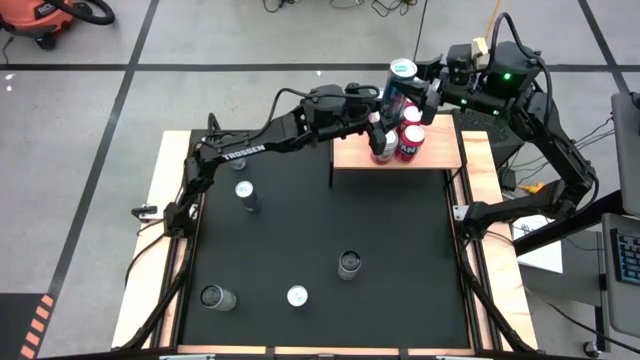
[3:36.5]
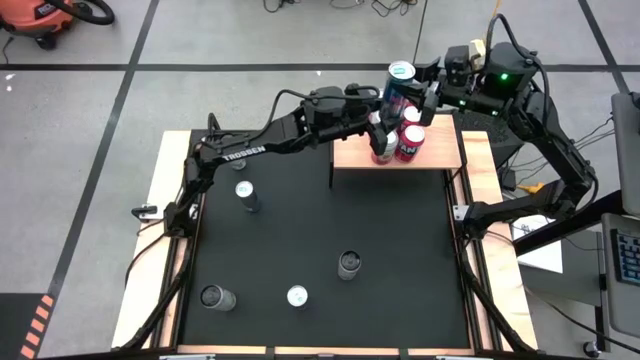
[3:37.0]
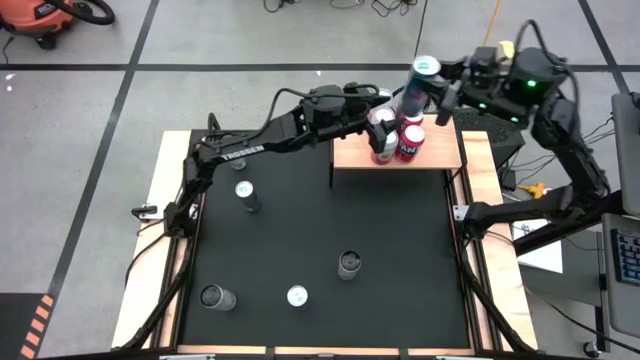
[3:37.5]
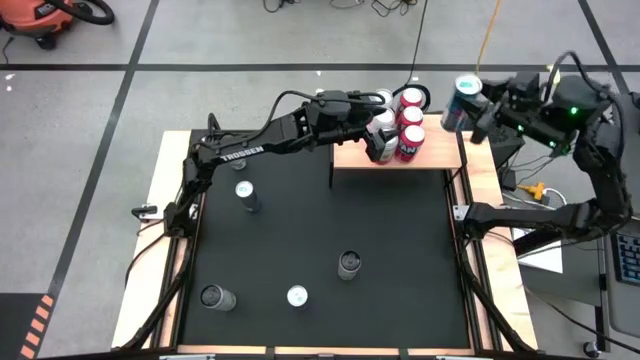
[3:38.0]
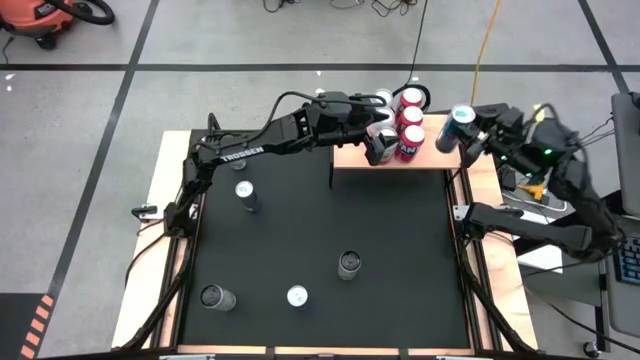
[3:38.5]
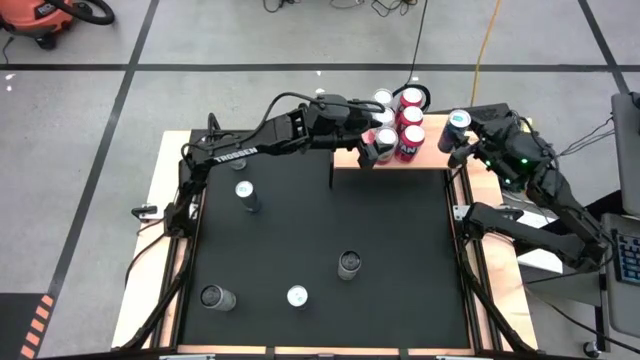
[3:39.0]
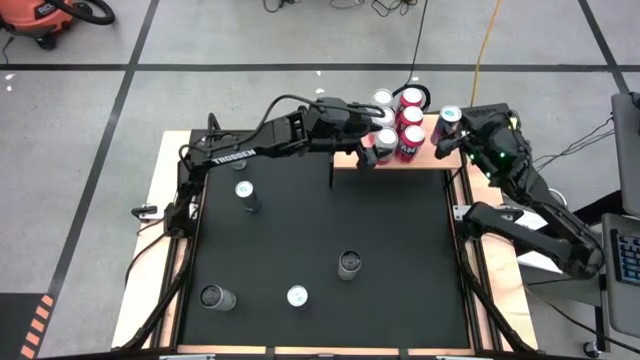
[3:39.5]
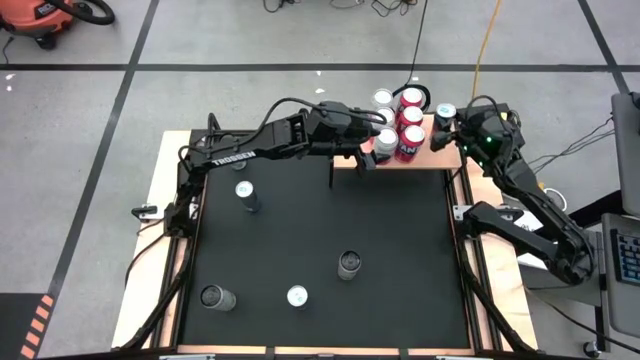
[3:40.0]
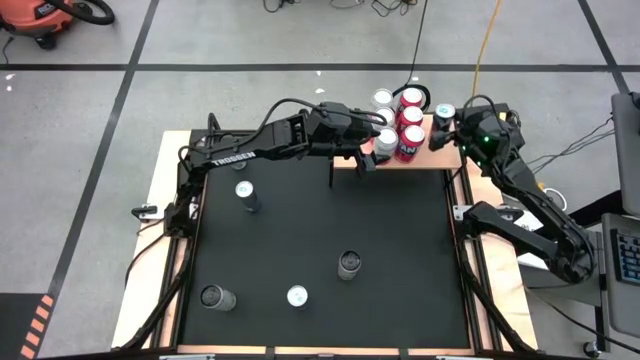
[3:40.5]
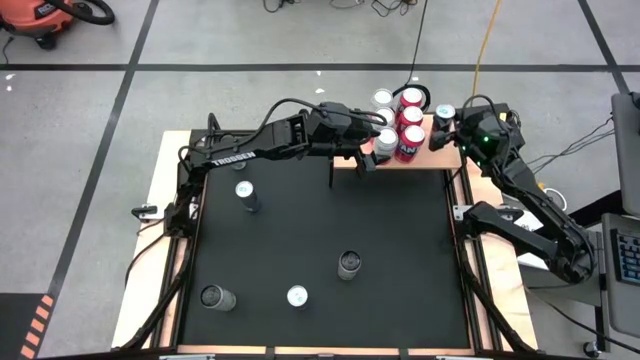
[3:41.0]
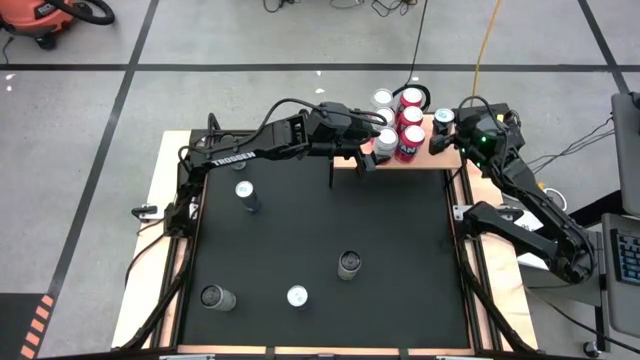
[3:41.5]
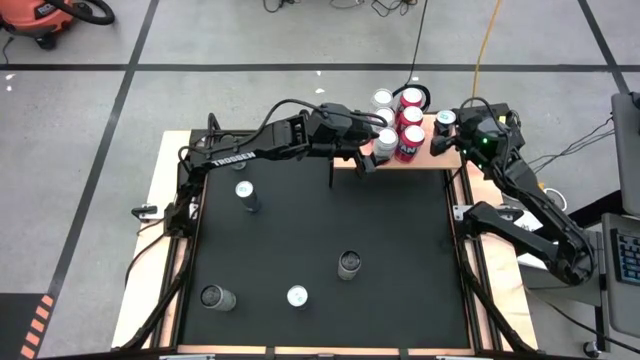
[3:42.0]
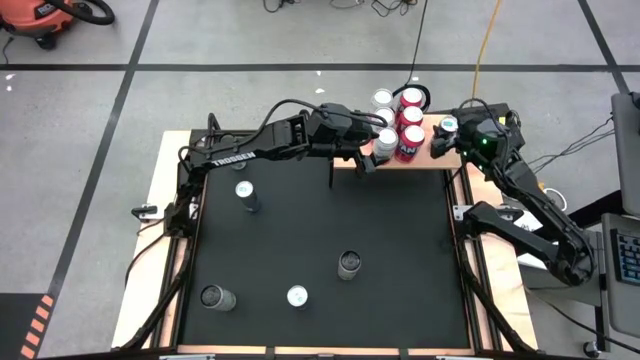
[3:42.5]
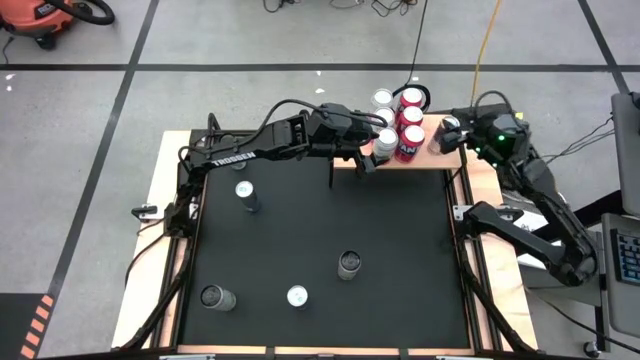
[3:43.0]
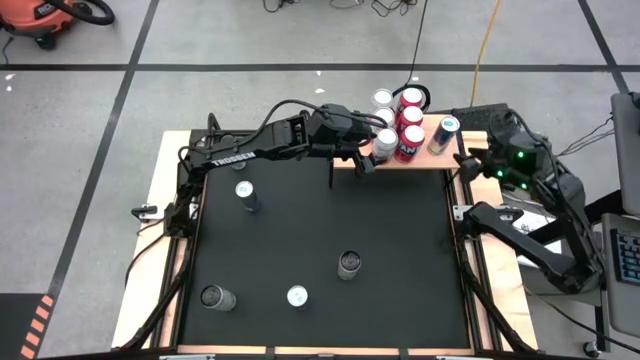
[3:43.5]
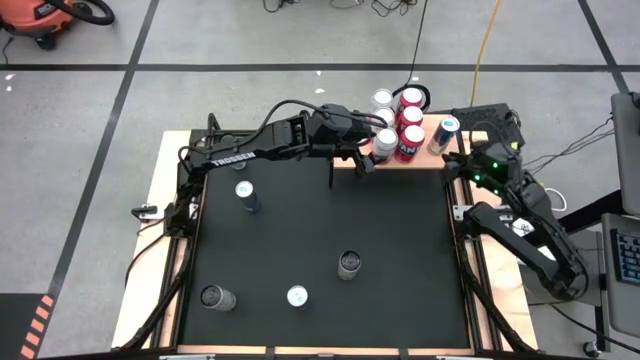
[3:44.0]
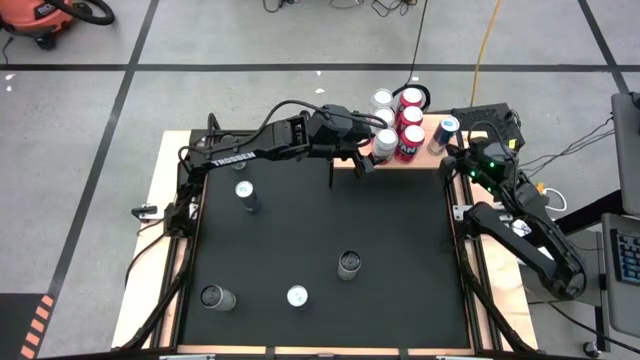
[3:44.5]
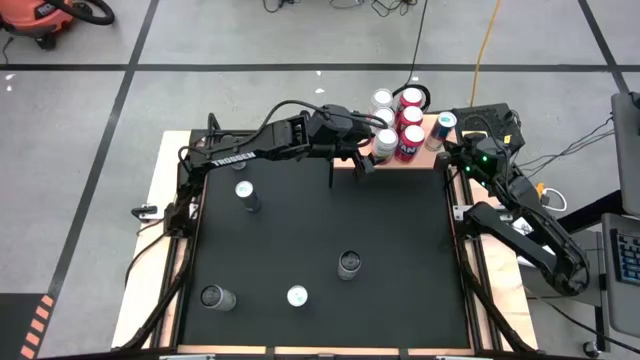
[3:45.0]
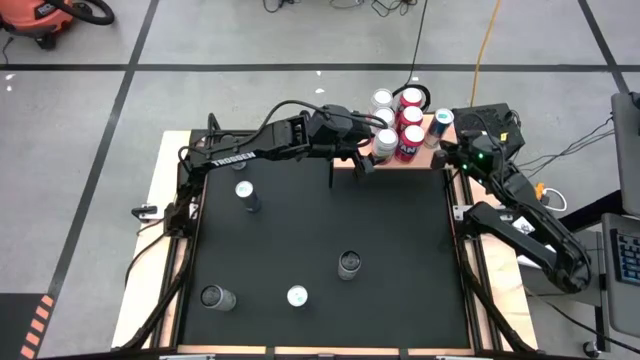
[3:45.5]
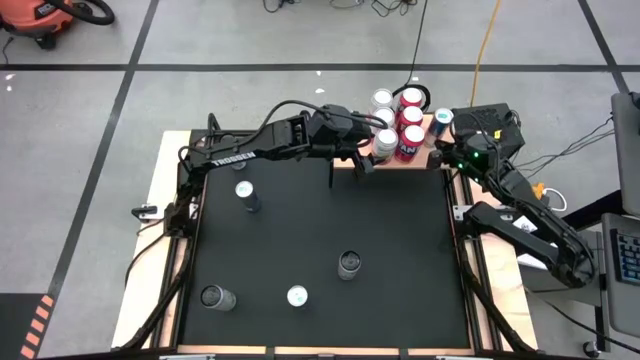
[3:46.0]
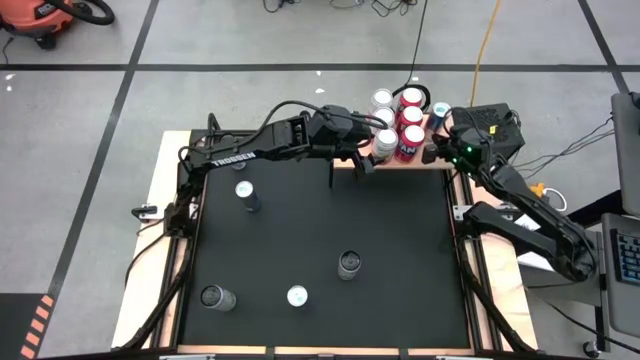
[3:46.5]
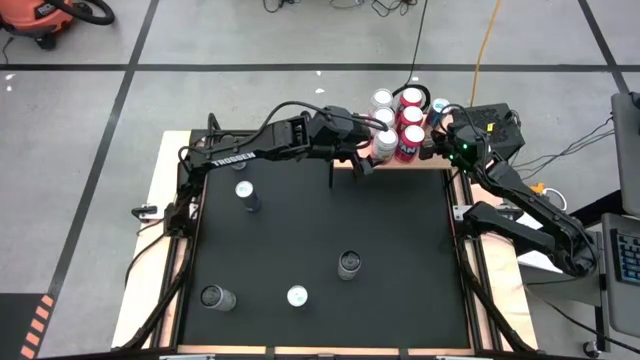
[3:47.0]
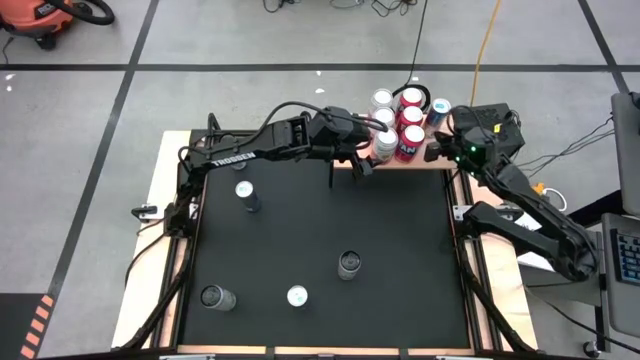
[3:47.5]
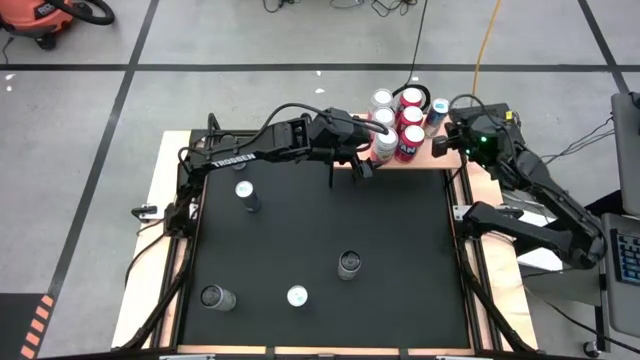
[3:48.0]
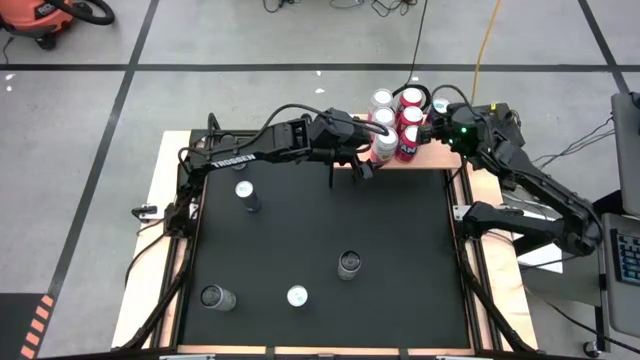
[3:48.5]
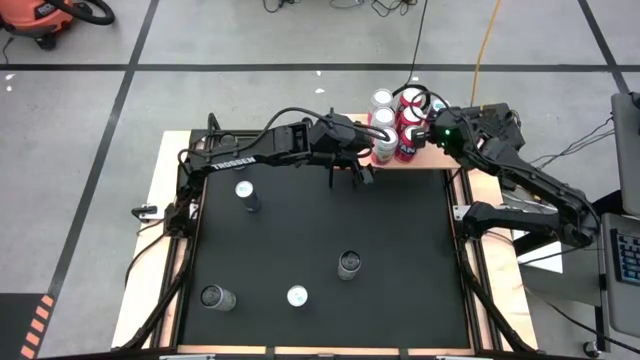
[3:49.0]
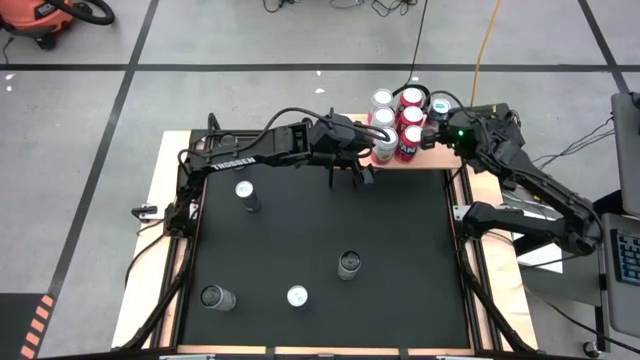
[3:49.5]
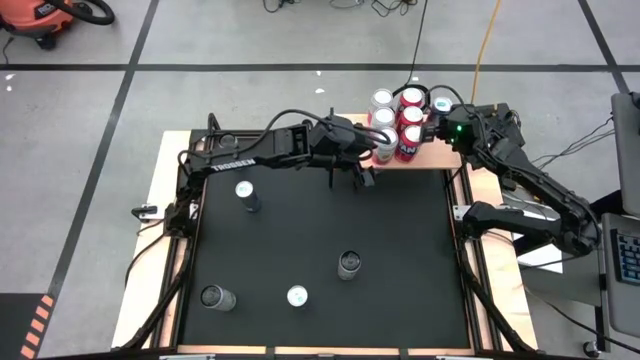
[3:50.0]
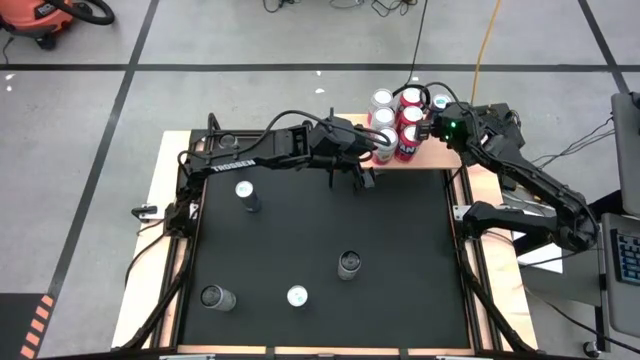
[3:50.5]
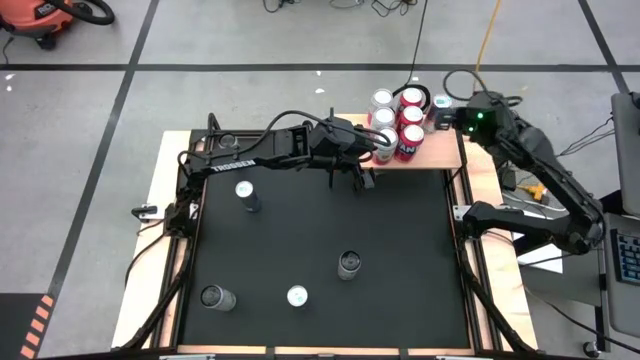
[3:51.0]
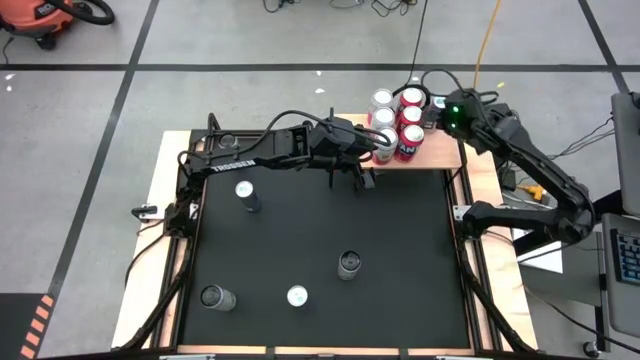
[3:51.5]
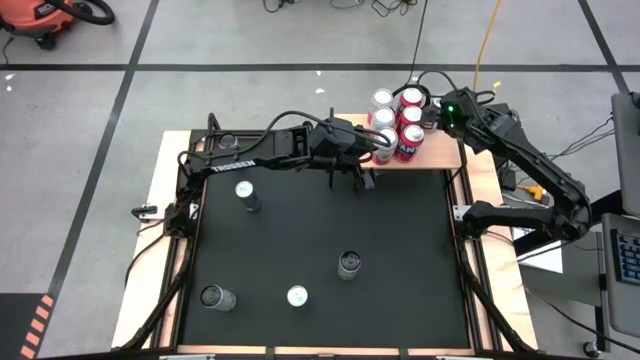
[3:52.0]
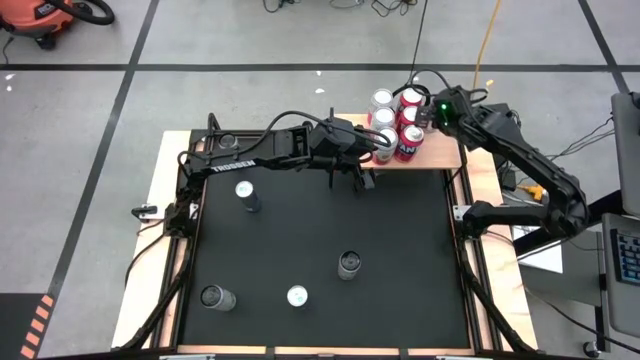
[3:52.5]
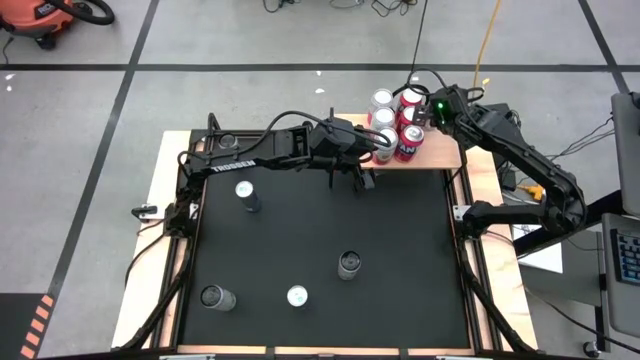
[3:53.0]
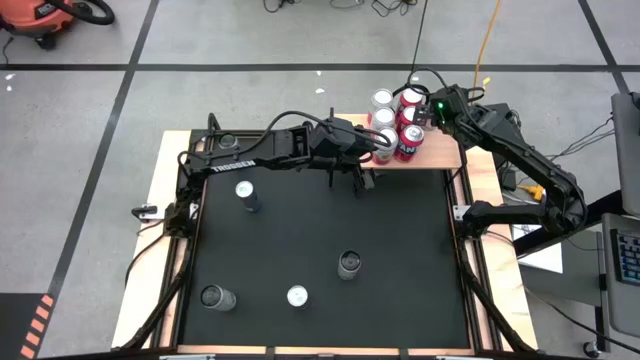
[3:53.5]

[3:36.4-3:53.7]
Task: Place canned beverage on shelf
Put the middle blue soda can on the shelf

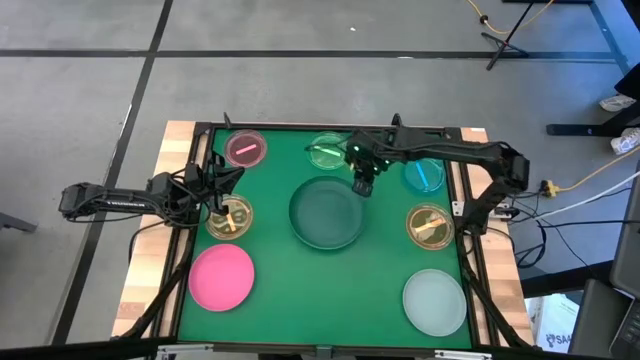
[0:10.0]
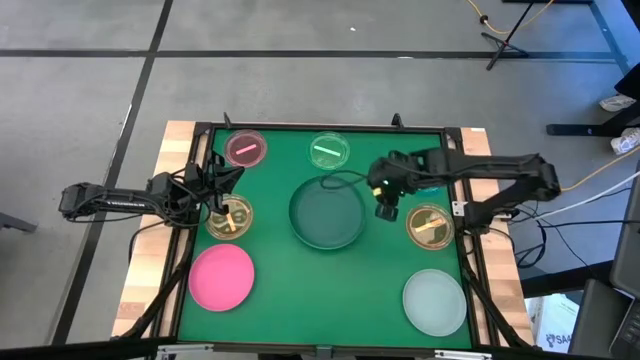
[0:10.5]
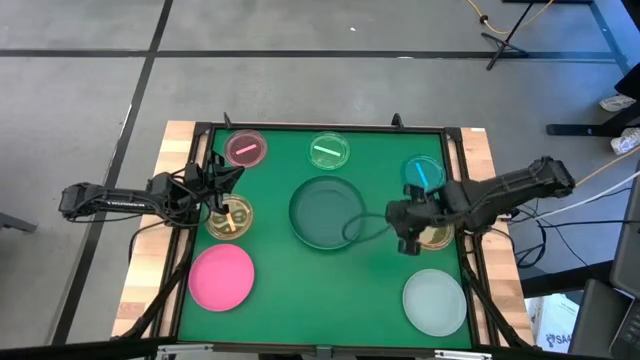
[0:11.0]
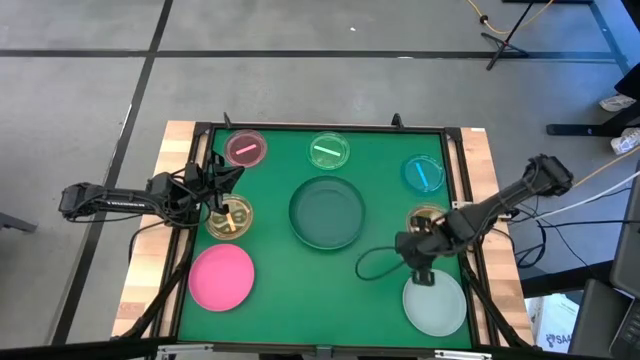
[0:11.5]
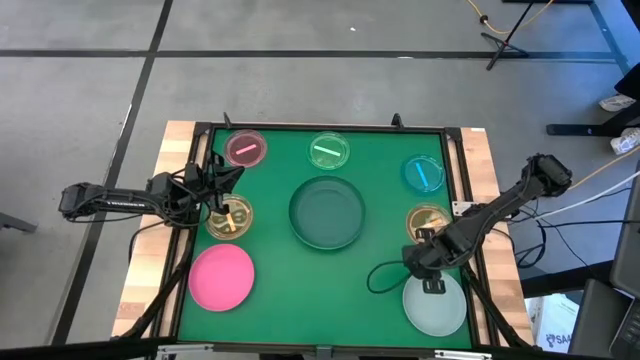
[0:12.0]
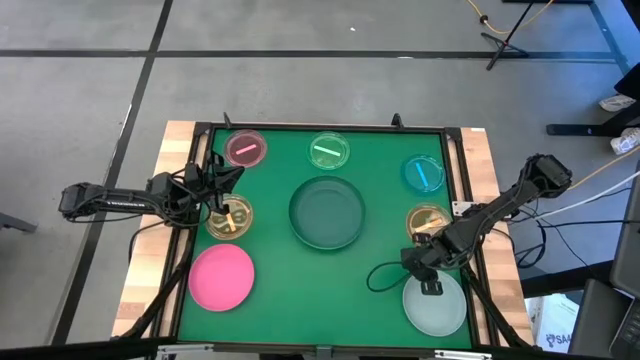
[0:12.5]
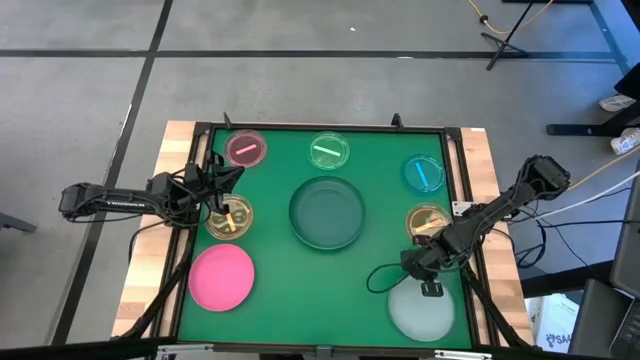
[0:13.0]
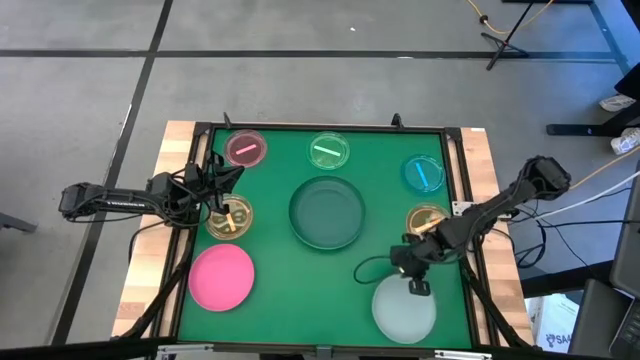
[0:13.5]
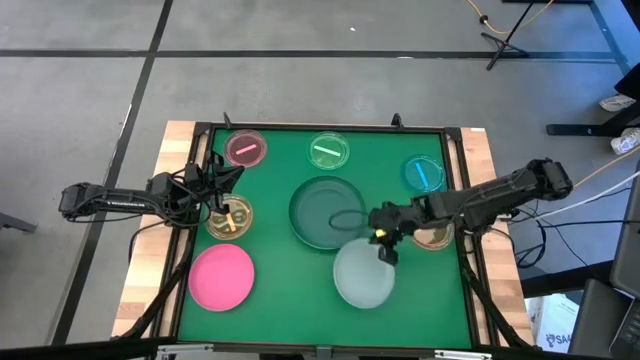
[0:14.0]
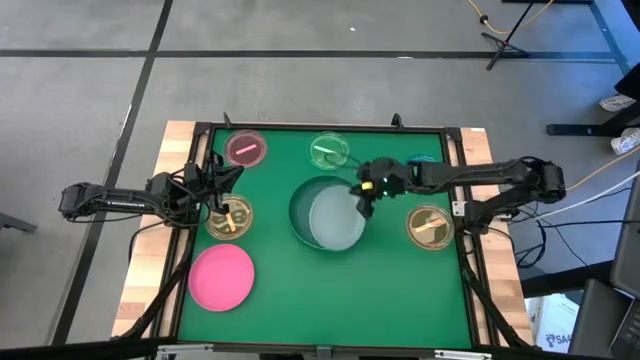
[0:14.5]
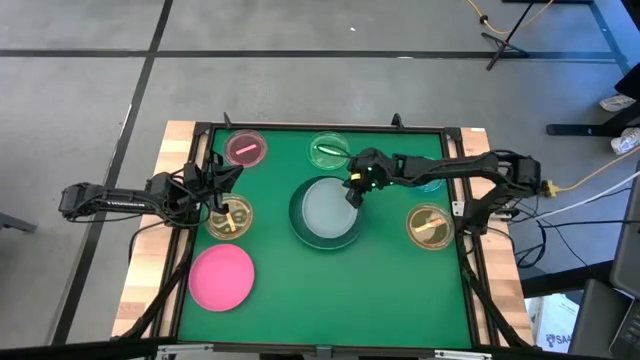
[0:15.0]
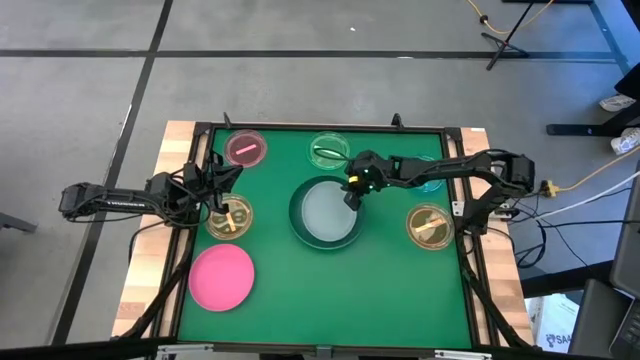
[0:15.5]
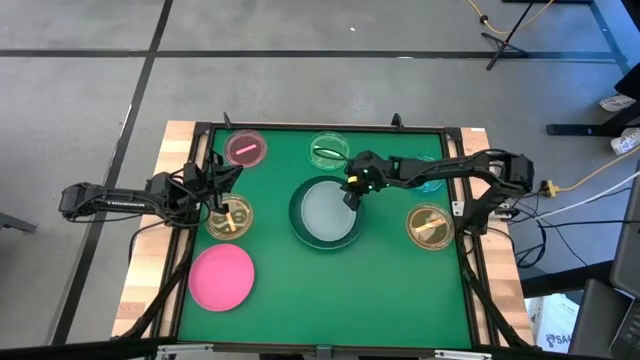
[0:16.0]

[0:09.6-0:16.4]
Task: Stack plastic plates
Stack the gray plate on the dark green plate
